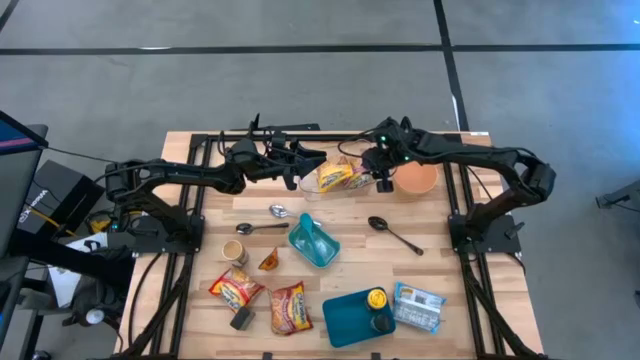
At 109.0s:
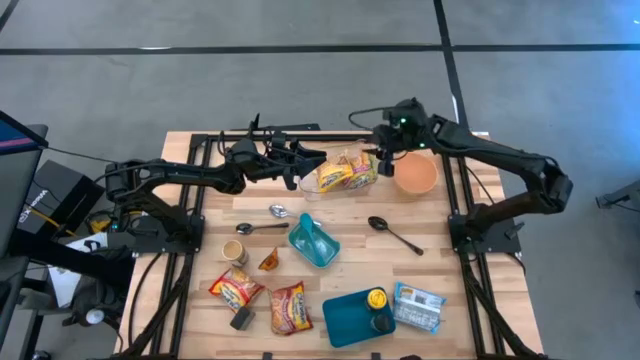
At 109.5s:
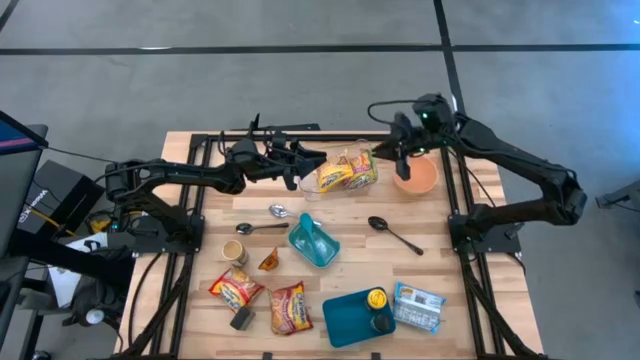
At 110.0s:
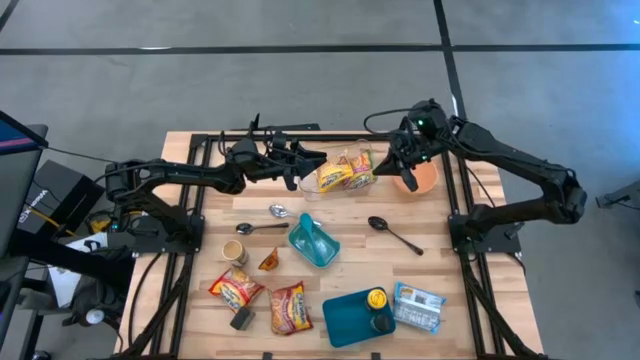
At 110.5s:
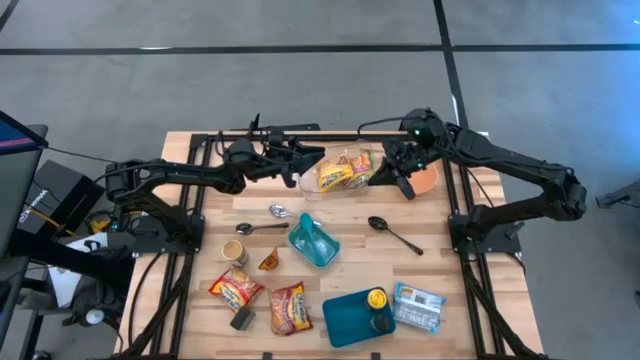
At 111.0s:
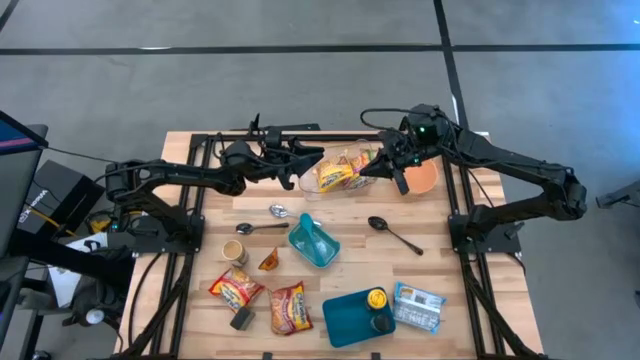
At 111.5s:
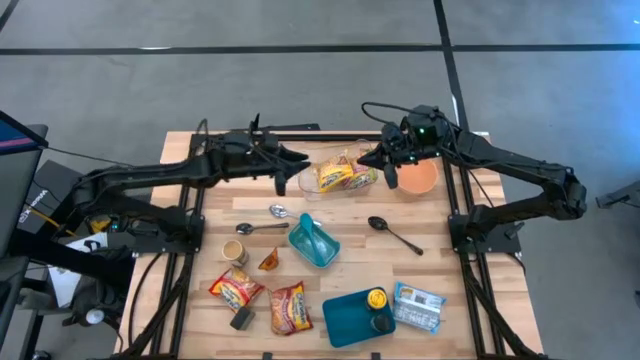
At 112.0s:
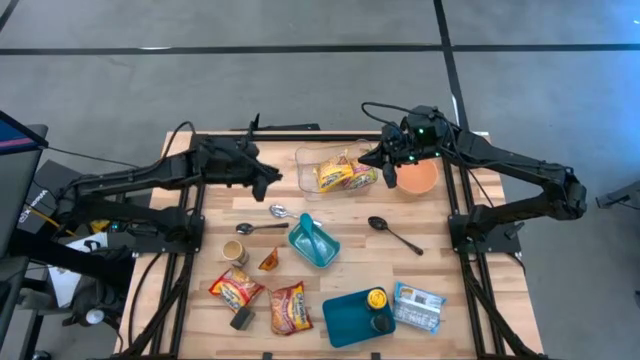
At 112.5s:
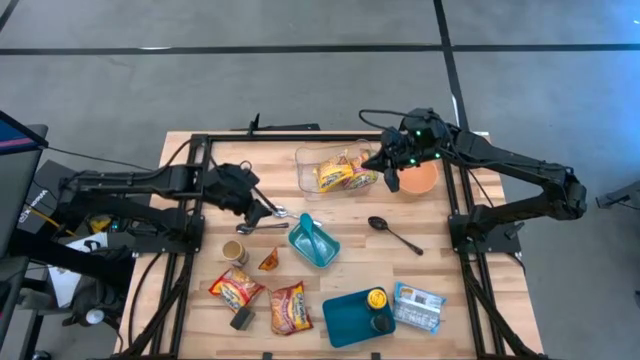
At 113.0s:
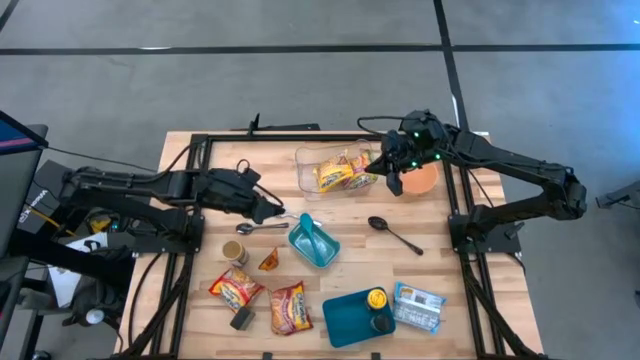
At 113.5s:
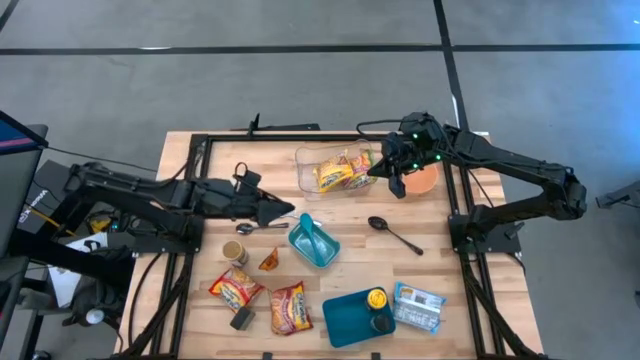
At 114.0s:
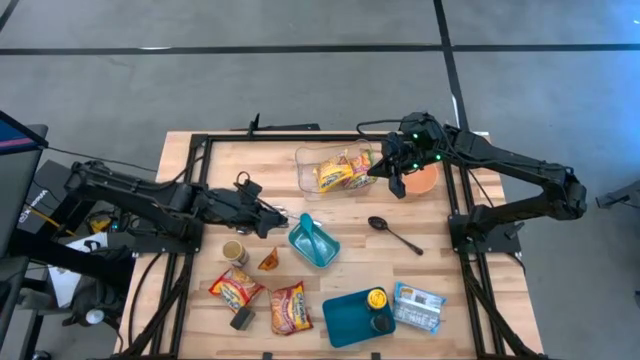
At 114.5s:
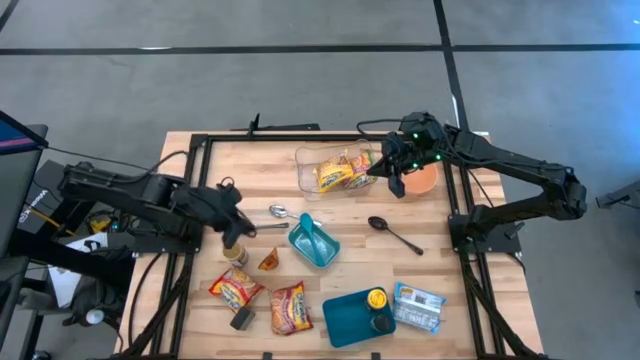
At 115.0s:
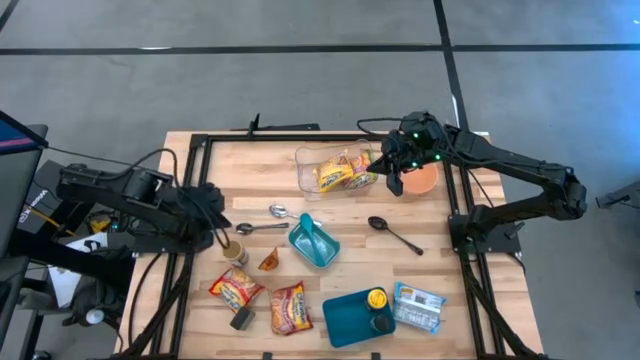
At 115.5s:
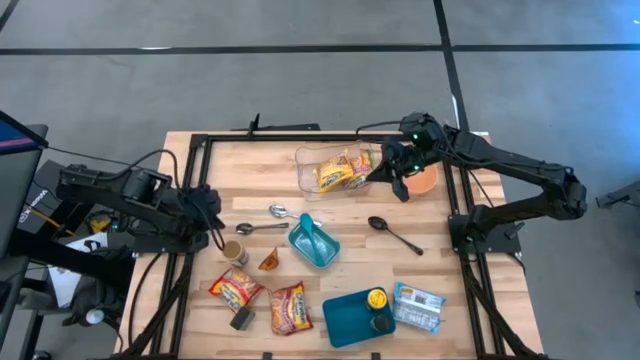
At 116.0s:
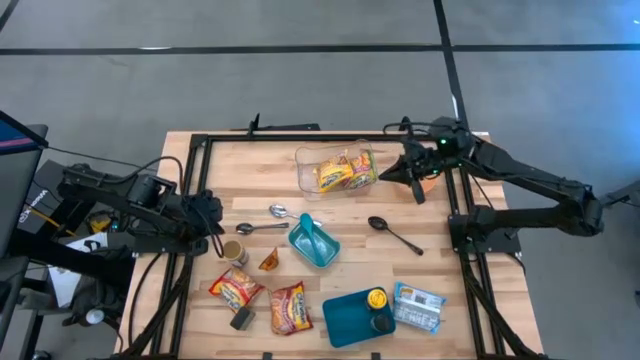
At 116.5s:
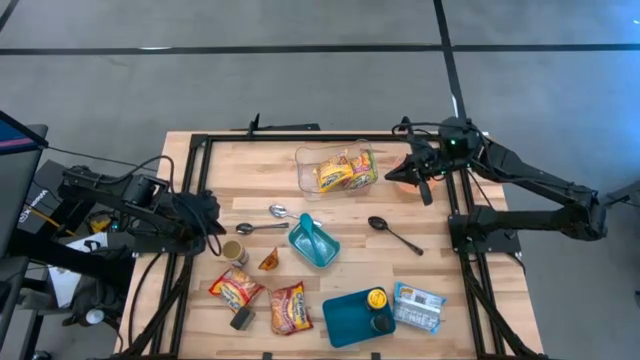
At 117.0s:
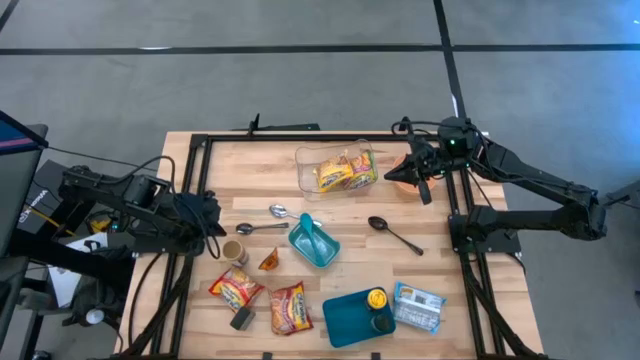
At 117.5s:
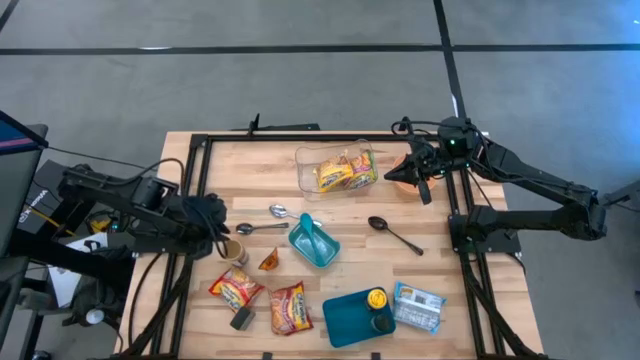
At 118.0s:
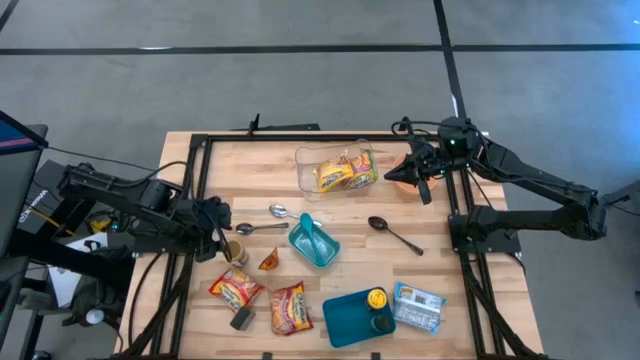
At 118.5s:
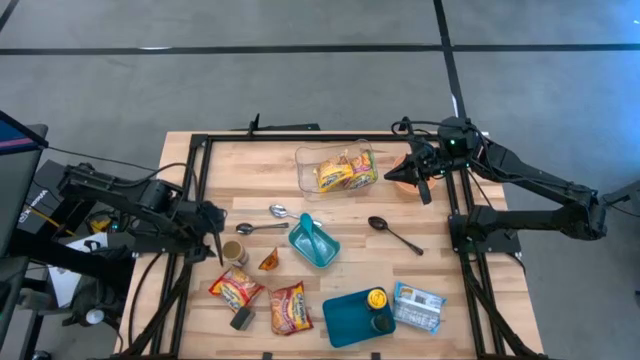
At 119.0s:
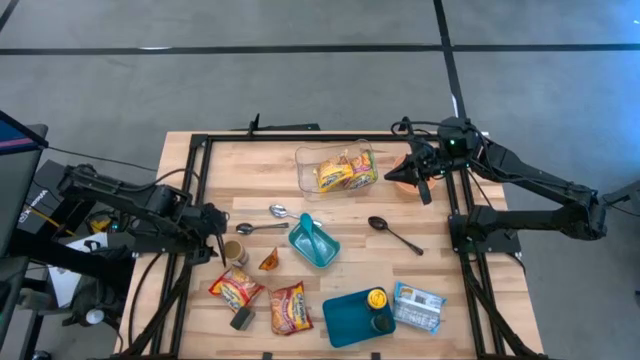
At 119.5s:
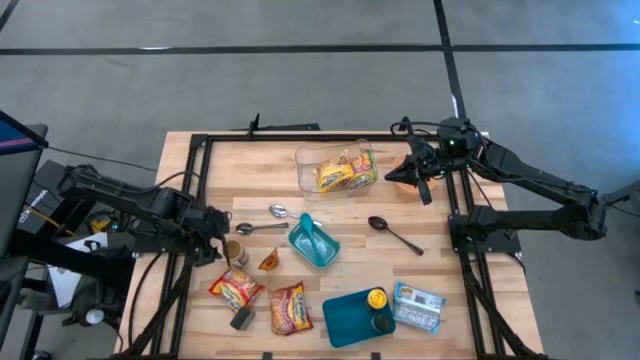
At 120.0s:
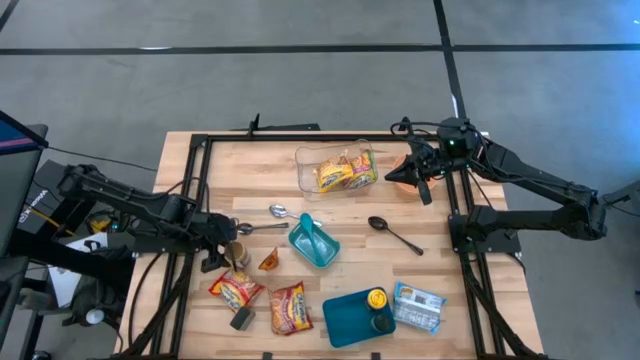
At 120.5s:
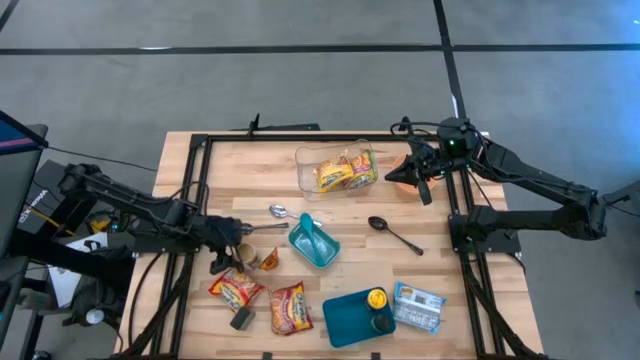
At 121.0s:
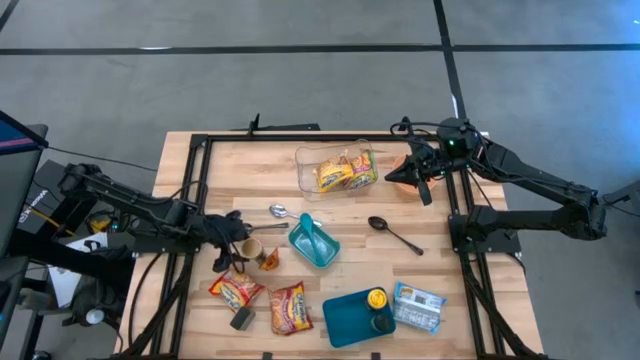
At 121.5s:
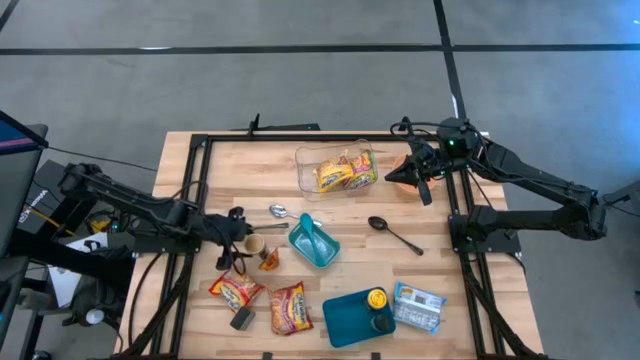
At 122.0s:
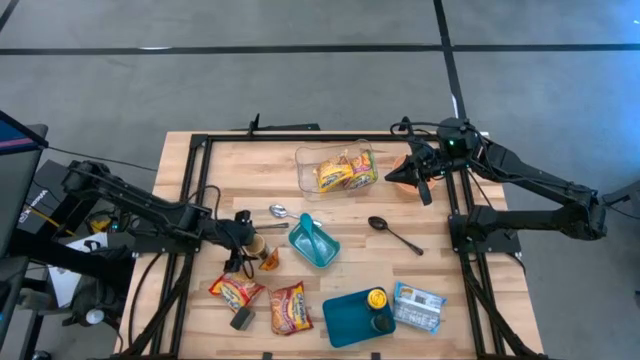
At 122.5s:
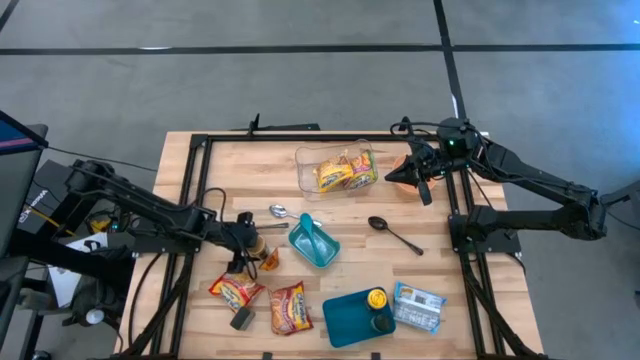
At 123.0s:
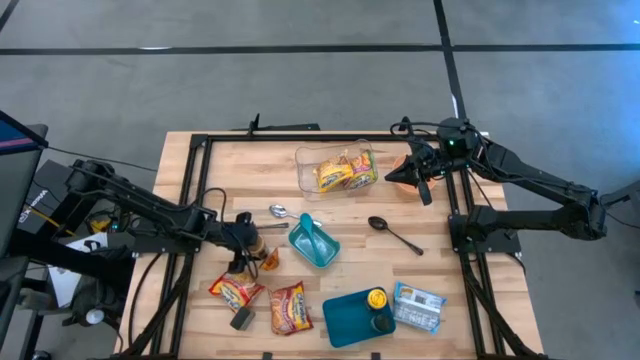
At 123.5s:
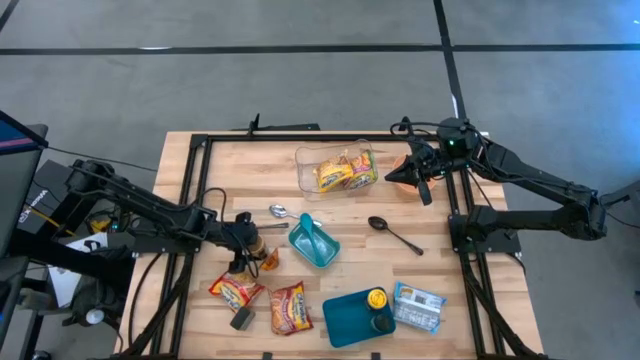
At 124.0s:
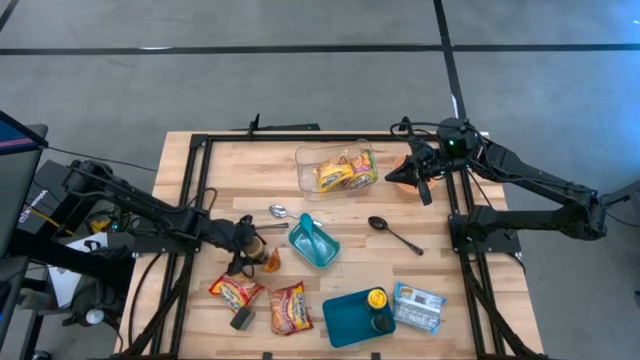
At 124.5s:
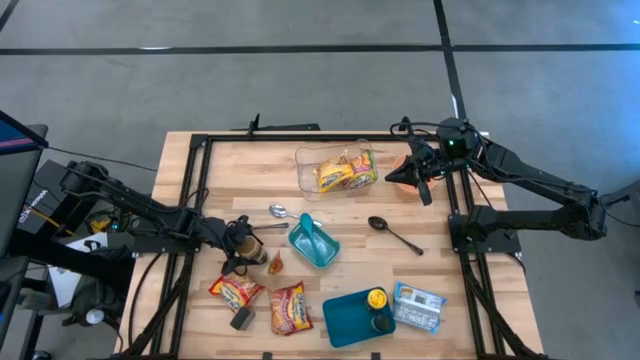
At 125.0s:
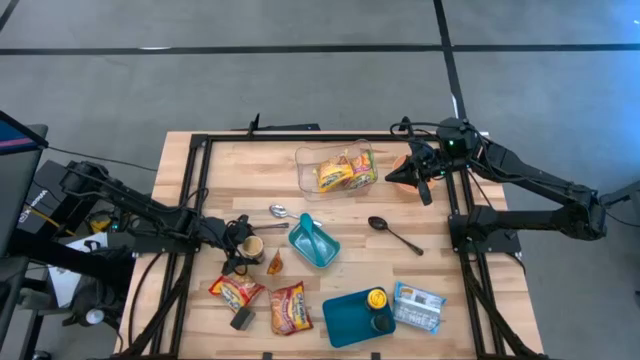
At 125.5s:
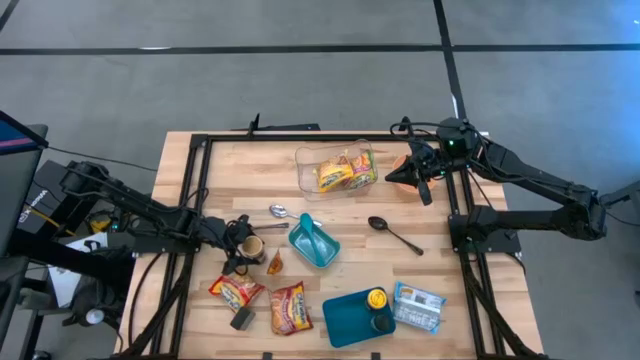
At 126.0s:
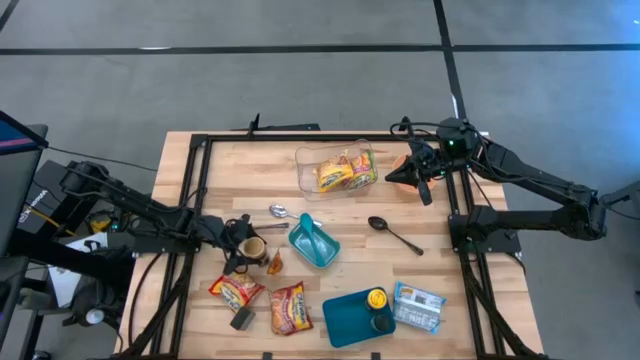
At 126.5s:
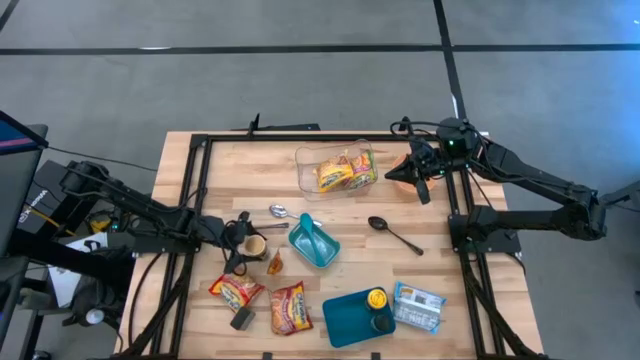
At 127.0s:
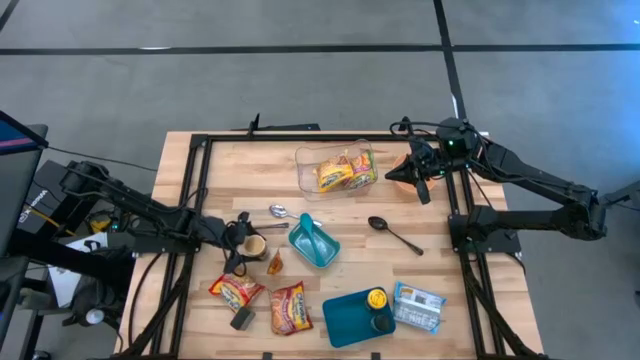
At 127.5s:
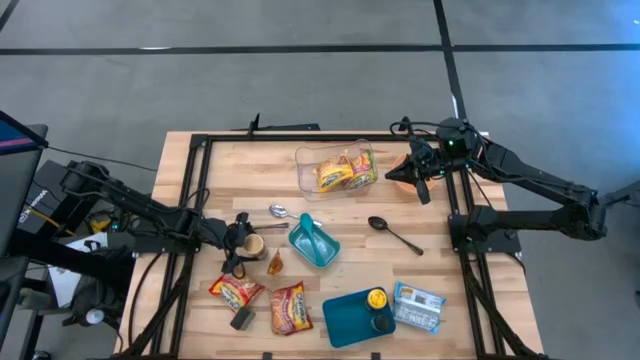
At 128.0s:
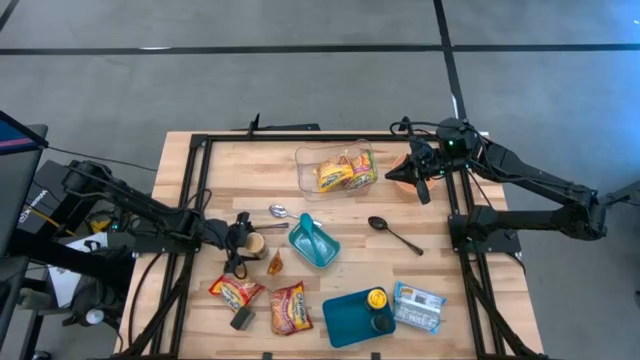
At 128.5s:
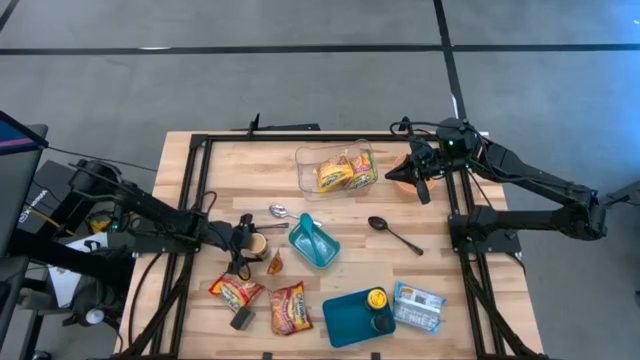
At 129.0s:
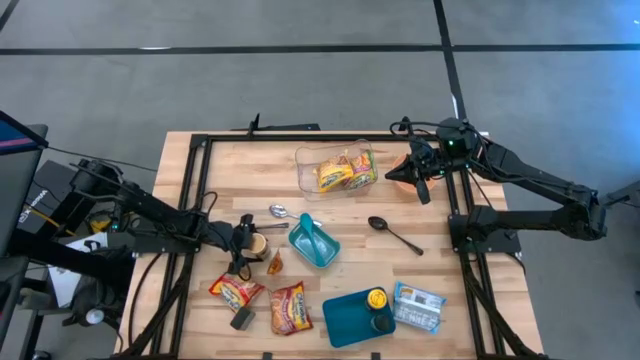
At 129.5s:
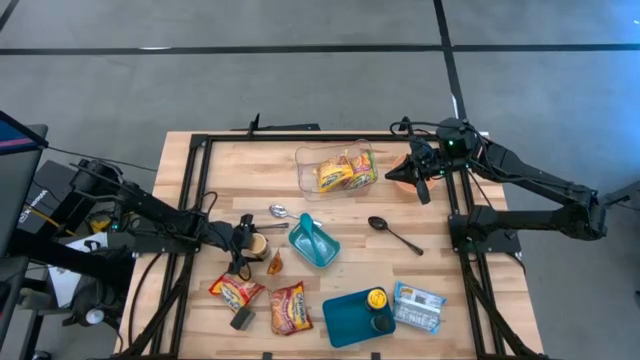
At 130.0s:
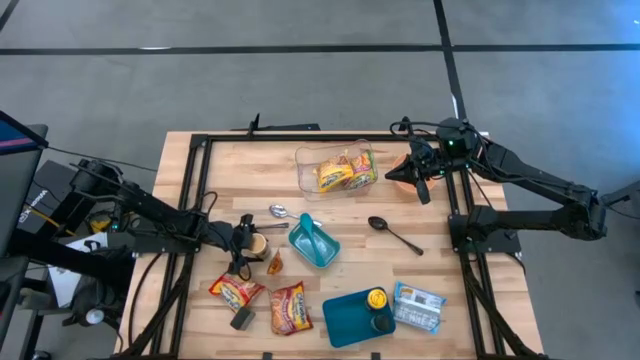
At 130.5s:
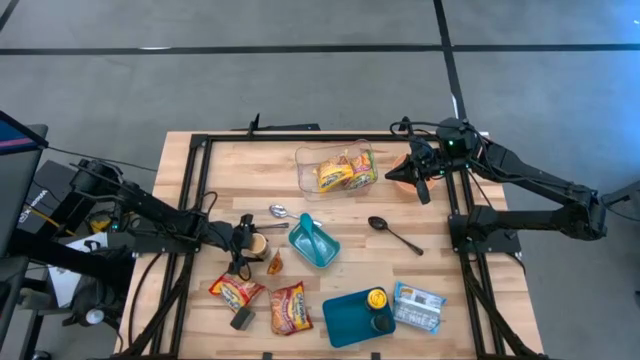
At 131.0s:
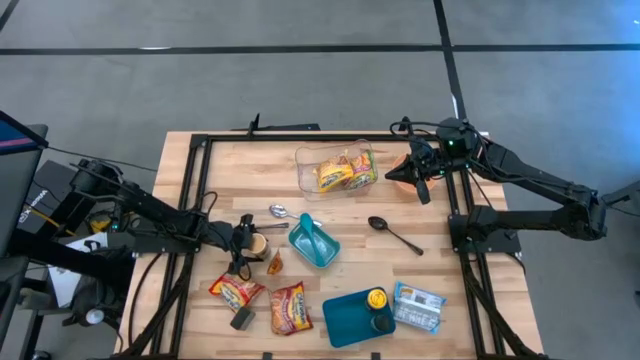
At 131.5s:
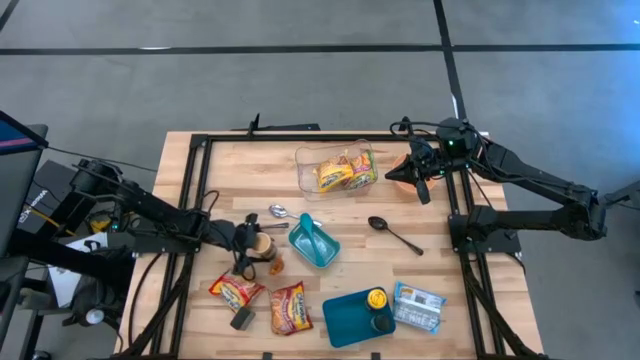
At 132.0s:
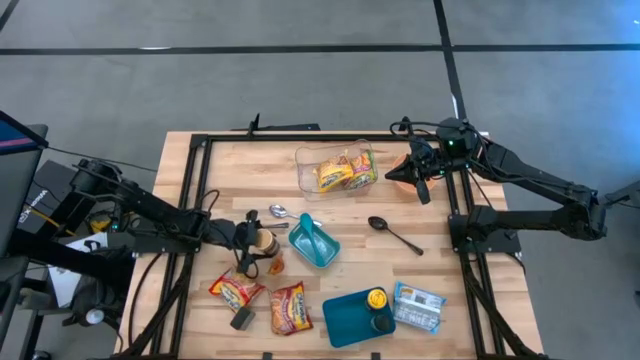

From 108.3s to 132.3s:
Task: Pick & Place Food Item
Put the golden seasoning bottle into the blue bin
